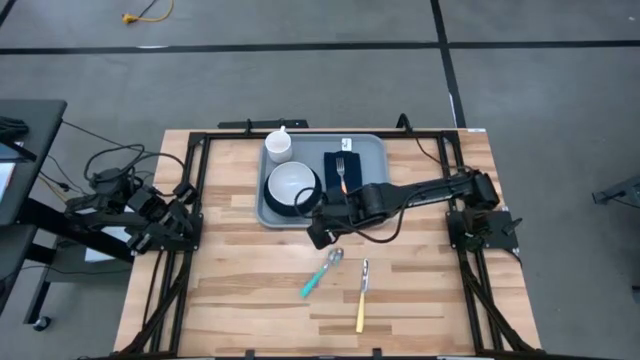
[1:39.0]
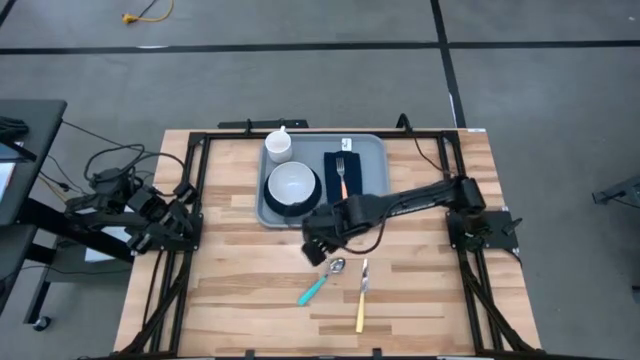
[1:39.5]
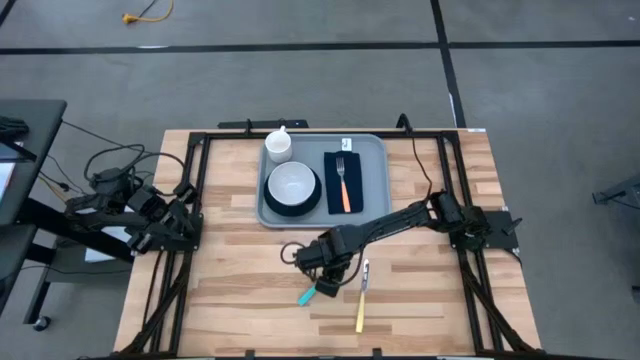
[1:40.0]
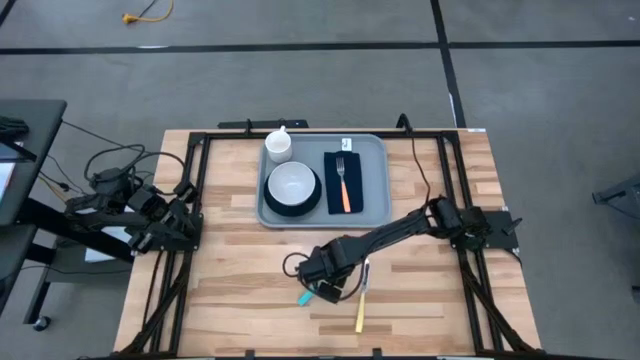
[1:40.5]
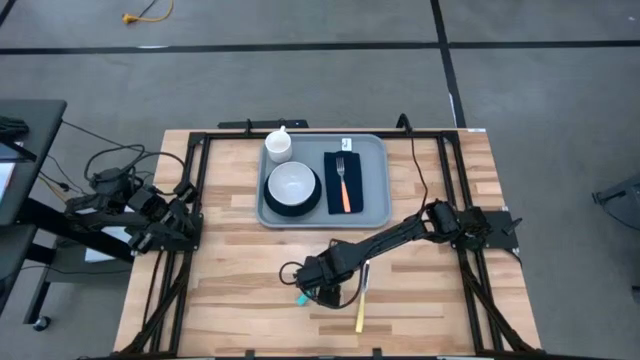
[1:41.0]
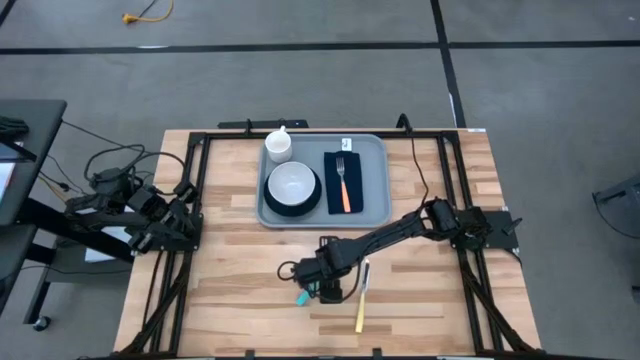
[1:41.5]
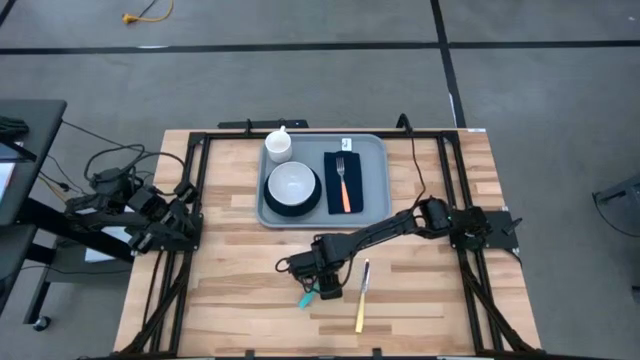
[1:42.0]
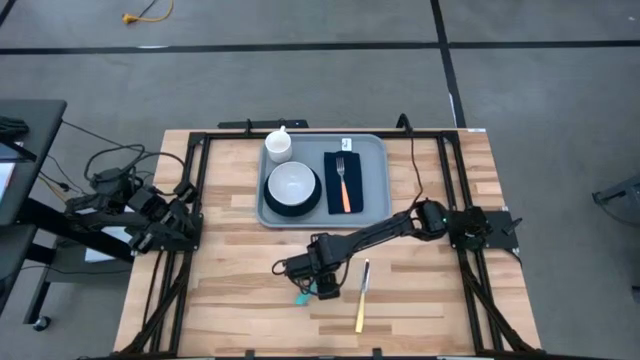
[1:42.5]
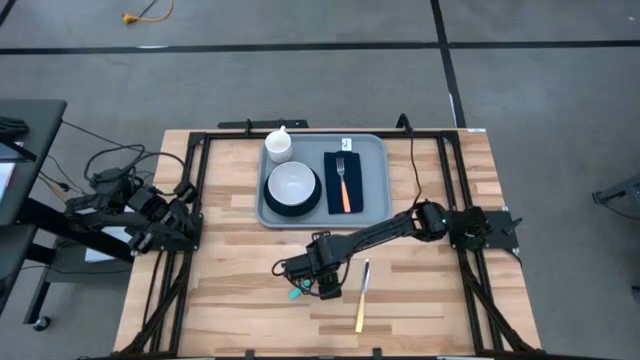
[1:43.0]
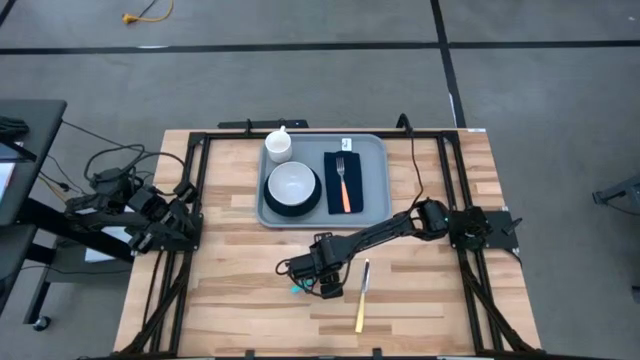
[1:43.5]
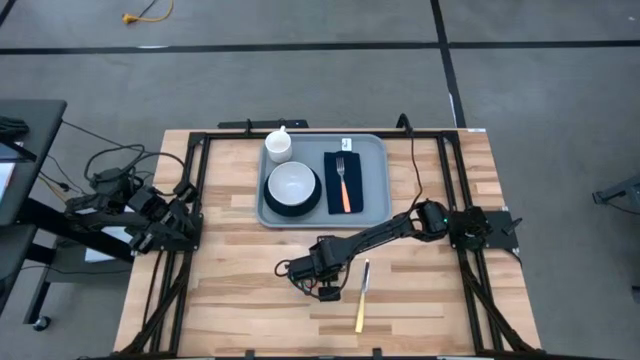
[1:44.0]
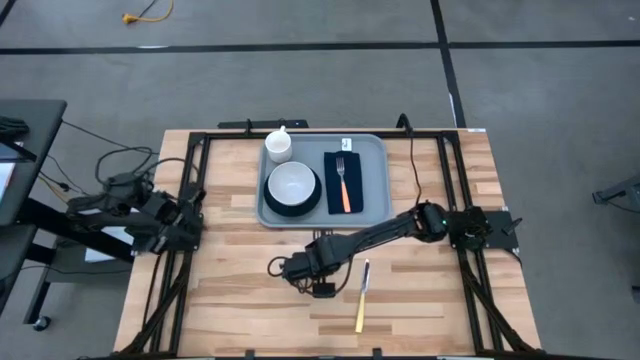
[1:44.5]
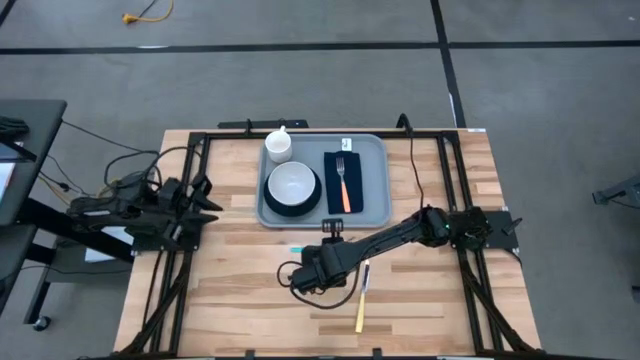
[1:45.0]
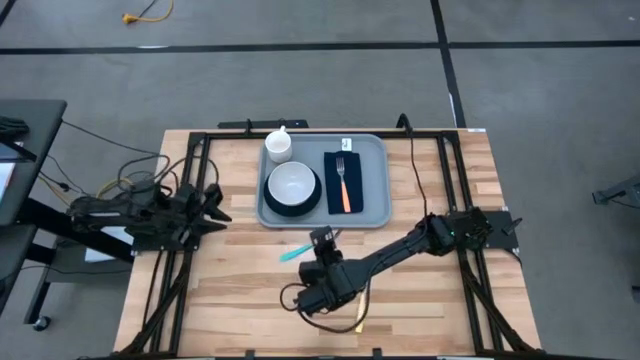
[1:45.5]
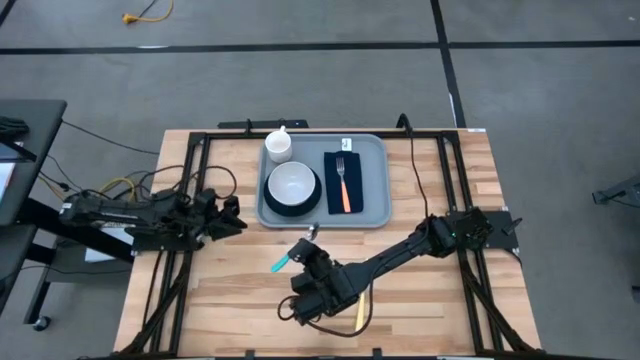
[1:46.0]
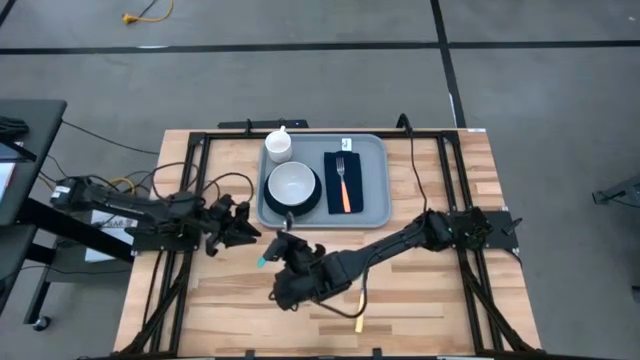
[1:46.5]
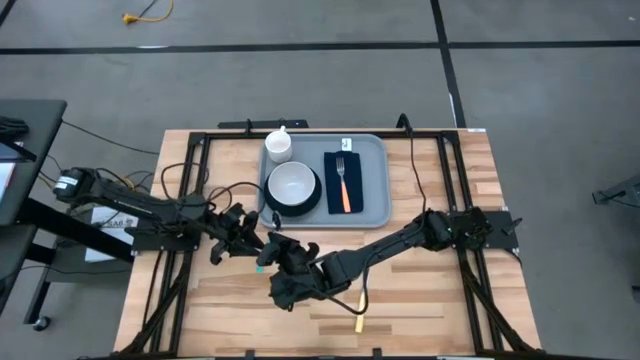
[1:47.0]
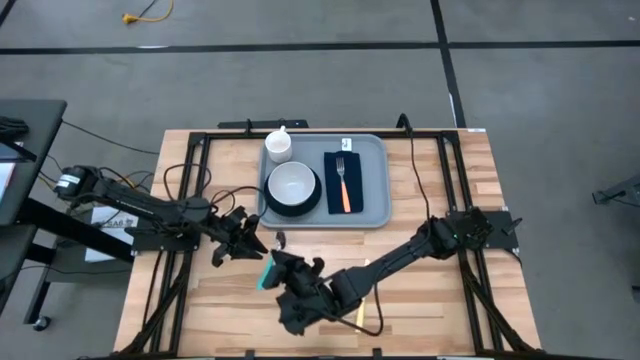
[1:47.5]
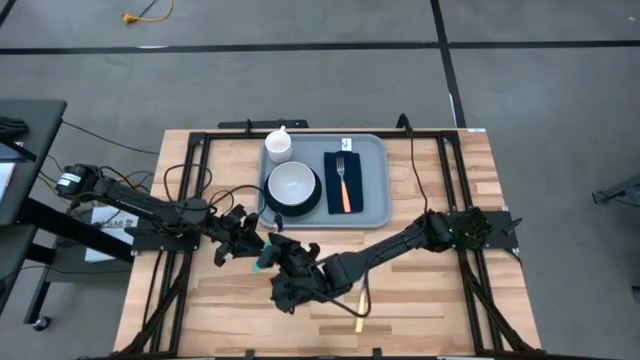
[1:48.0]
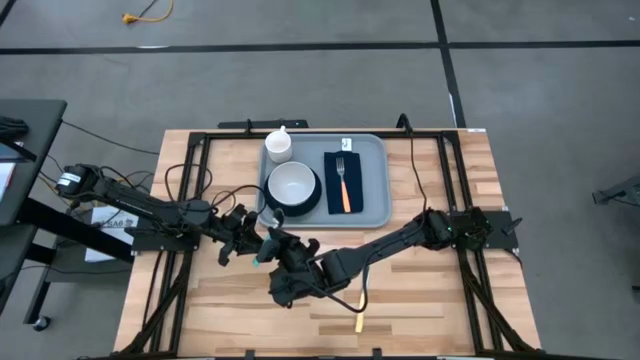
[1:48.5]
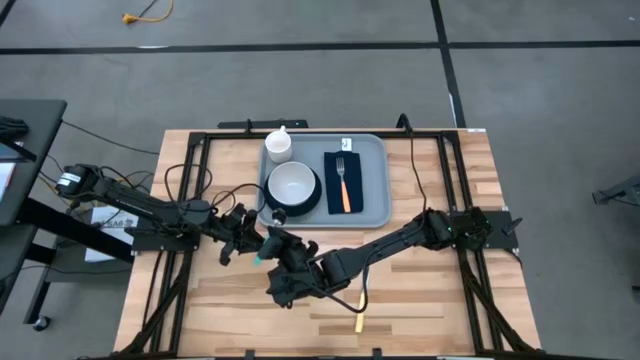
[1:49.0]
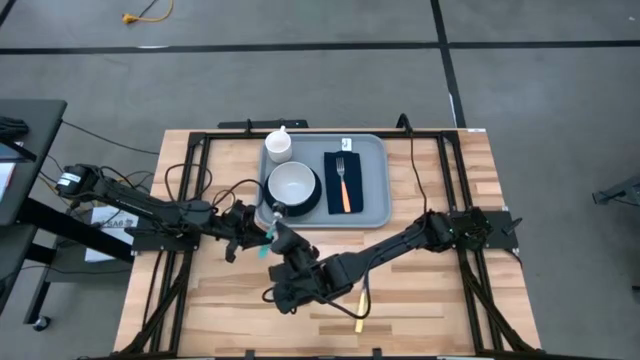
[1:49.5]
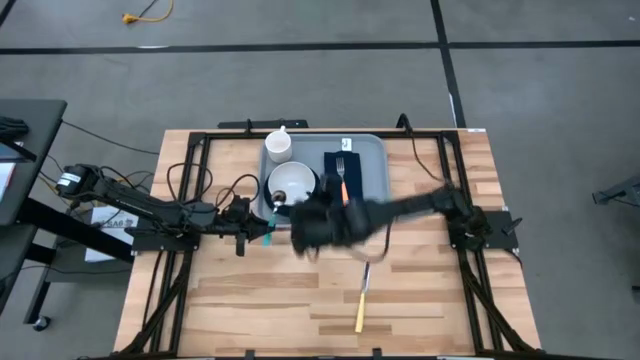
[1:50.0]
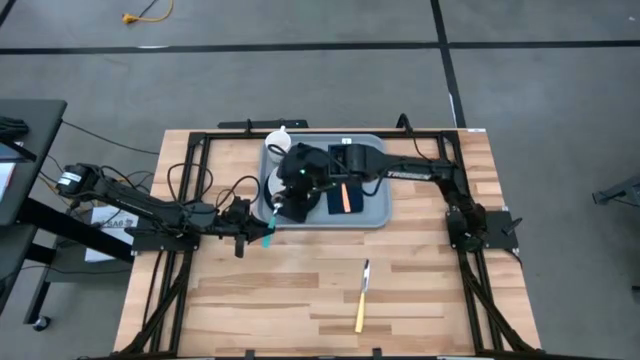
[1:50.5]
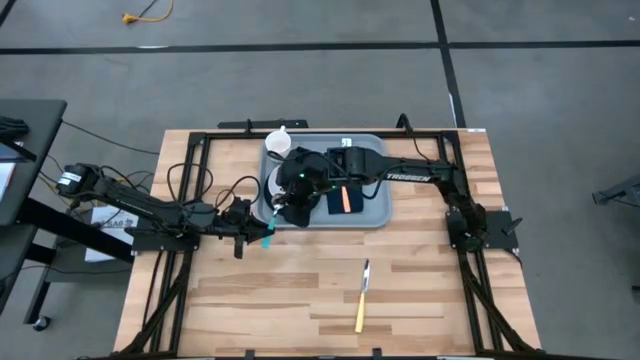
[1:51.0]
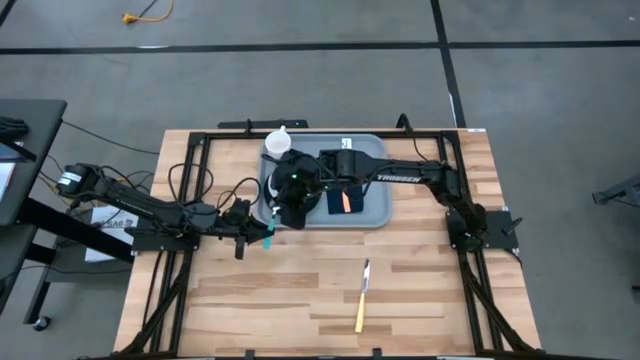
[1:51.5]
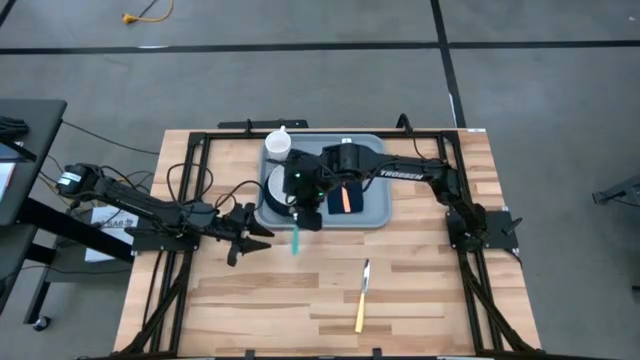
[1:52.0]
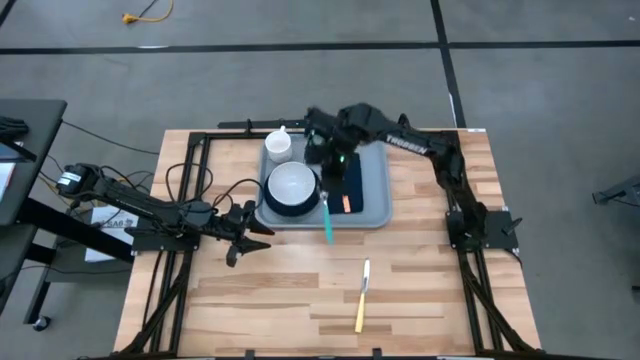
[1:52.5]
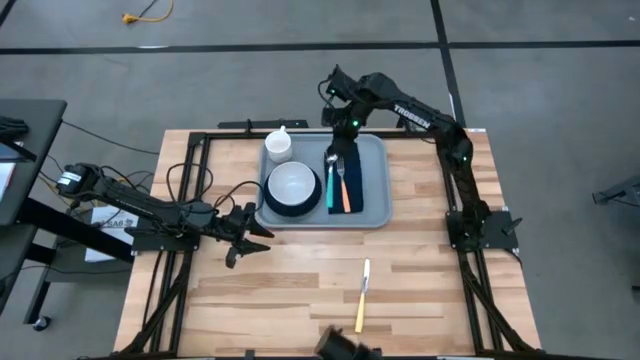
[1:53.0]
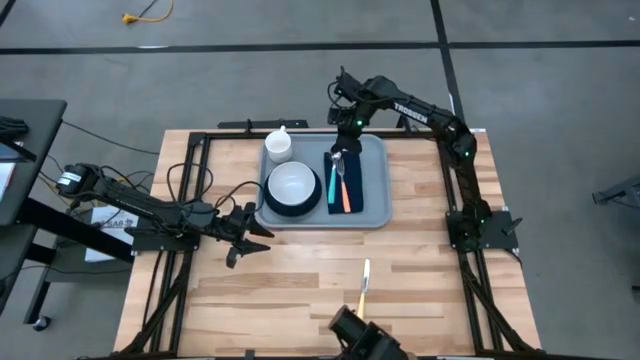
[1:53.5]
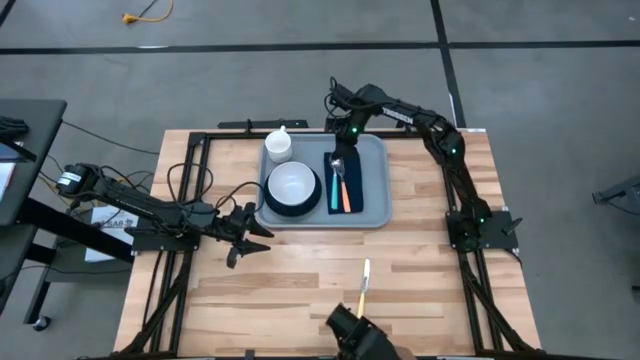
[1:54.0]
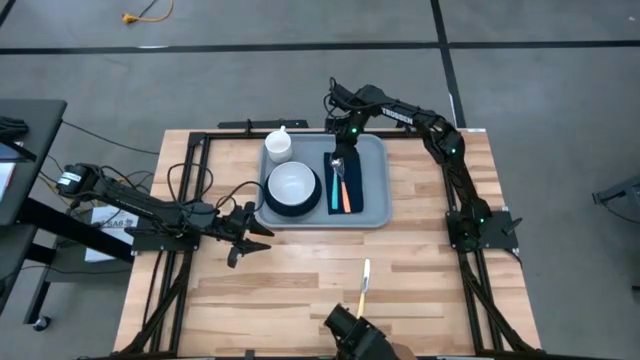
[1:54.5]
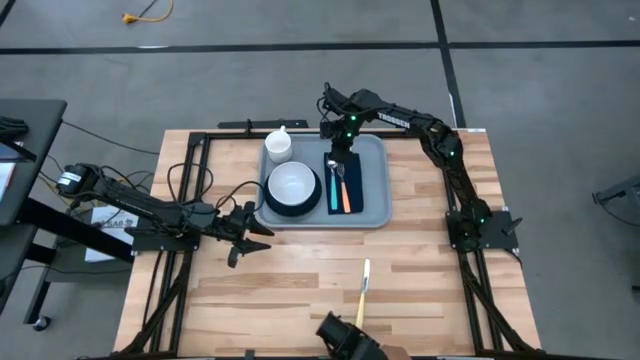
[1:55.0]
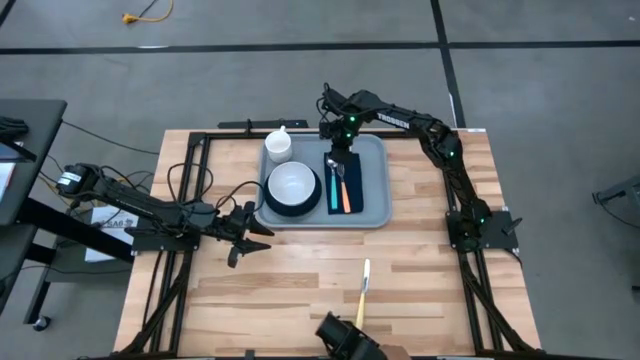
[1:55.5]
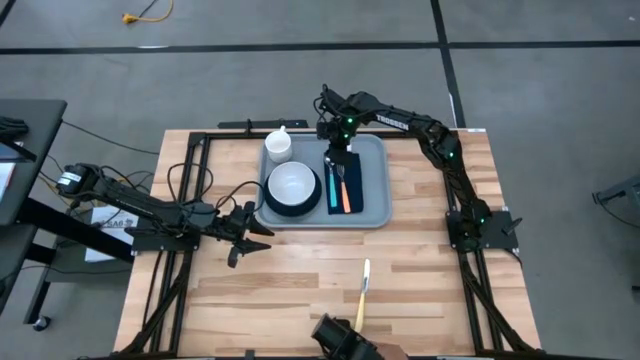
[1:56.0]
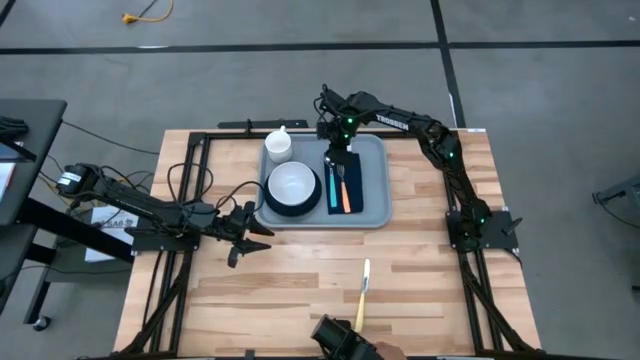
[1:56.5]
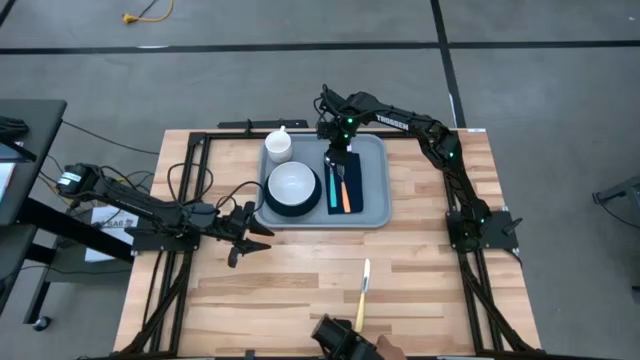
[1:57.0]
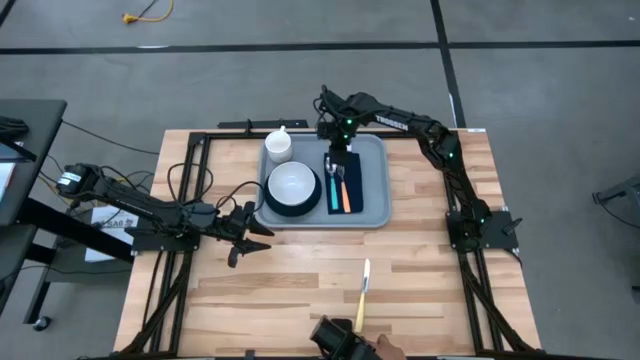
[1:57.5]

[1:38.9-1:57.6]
Task: Set up tray
Put the blue spoon on the dark blue napkin to the left of the orange fork

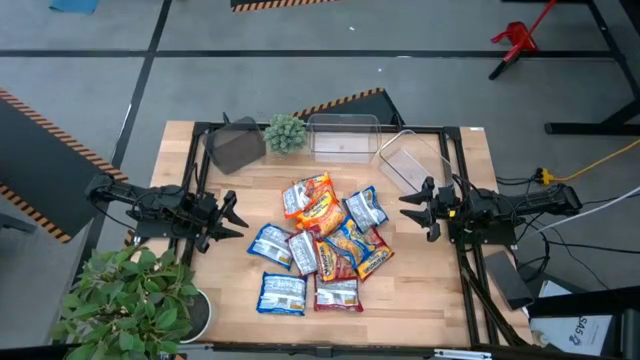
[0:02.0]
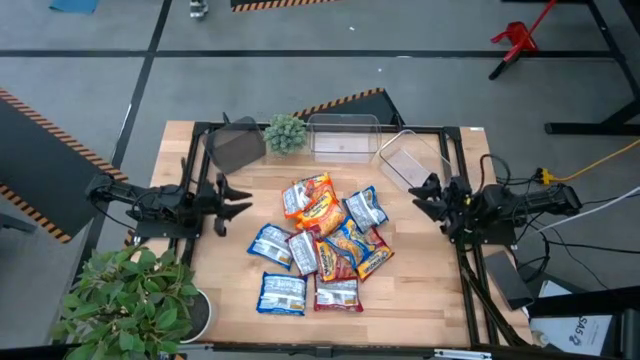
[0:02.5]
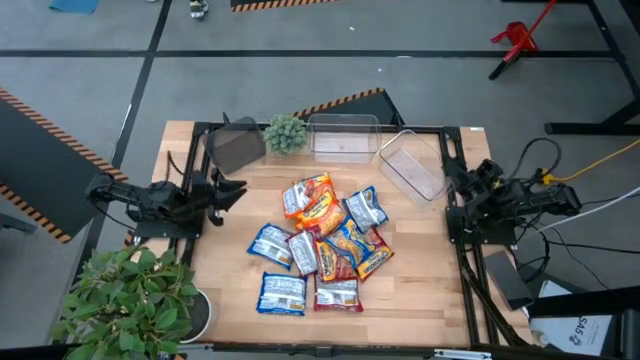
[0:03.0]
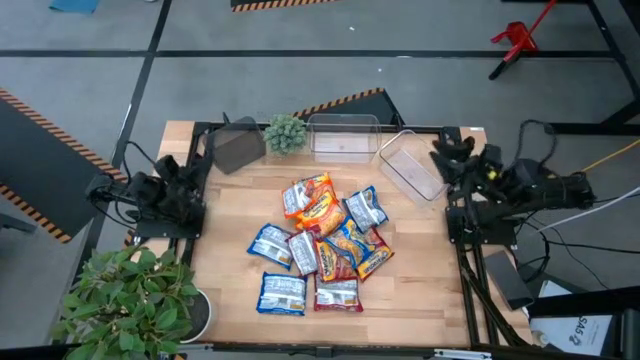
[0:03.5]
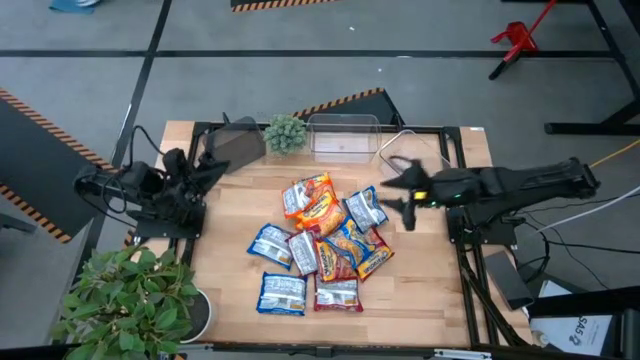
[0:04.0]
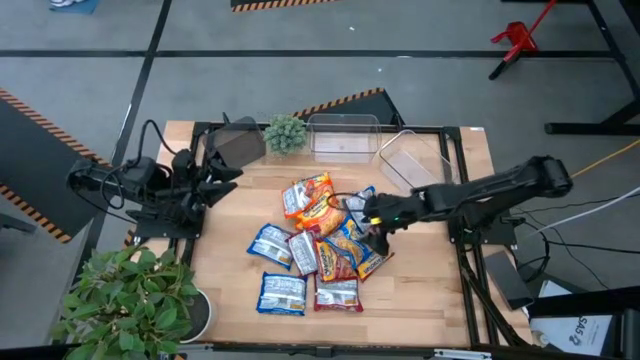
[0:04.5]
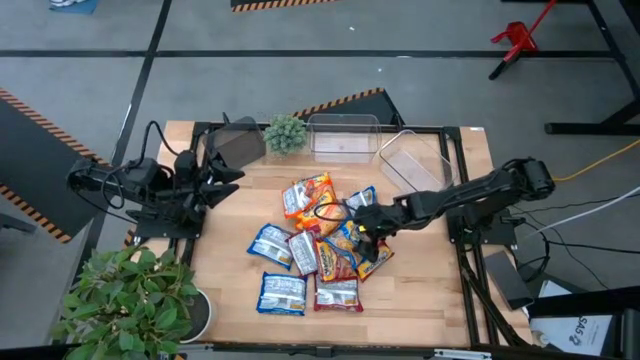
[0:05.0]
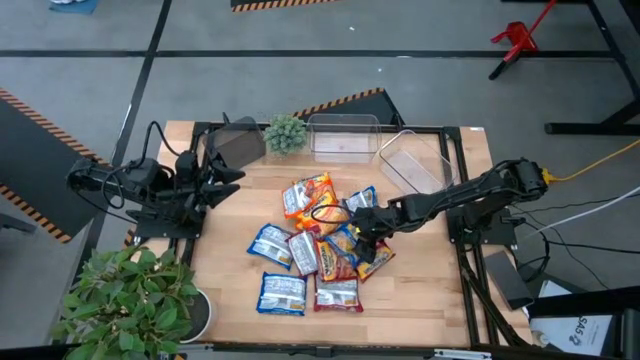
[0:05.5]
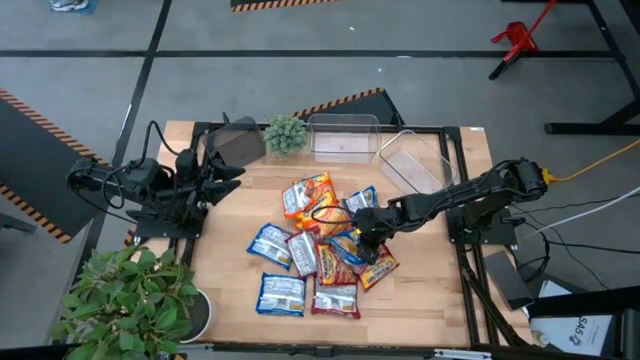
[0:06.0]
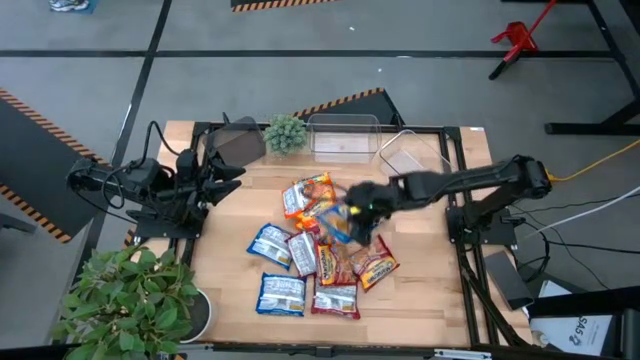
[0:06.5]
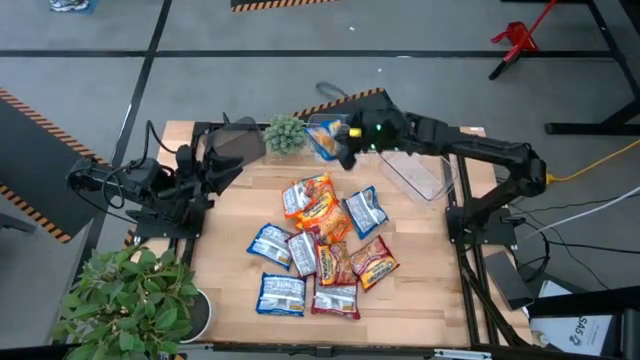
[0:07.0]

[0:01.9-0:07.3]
Task: Sort Maruchan noodles
Put the blue noodle pack into the black bin
